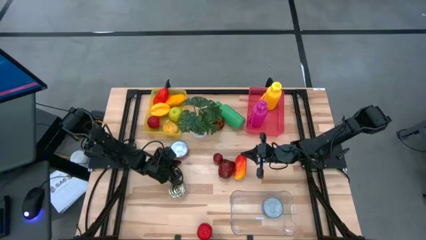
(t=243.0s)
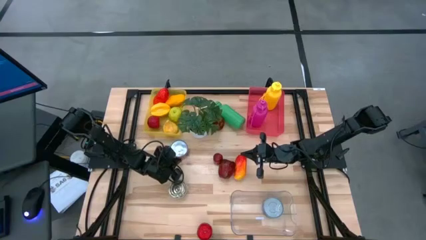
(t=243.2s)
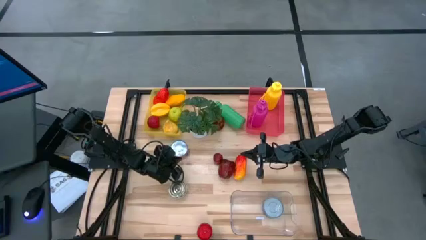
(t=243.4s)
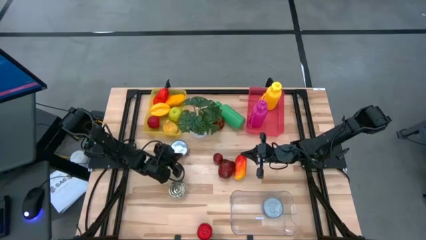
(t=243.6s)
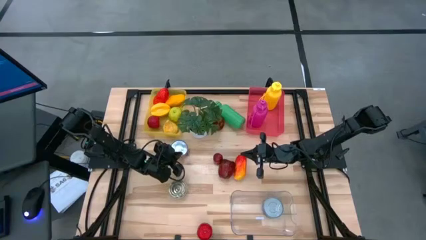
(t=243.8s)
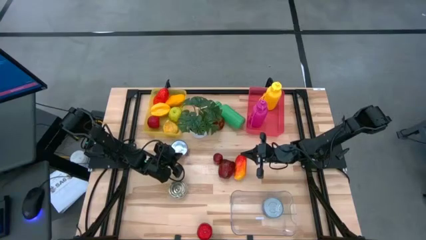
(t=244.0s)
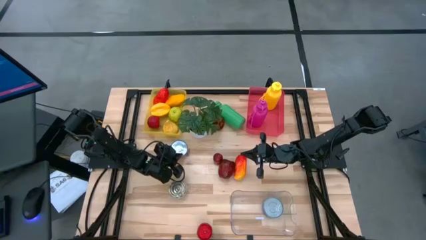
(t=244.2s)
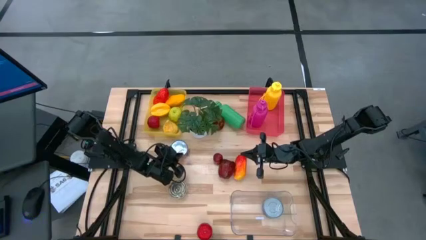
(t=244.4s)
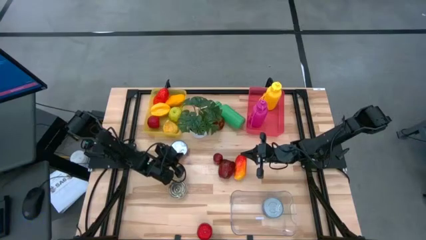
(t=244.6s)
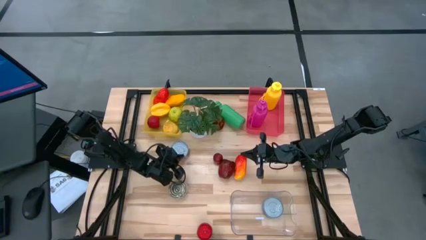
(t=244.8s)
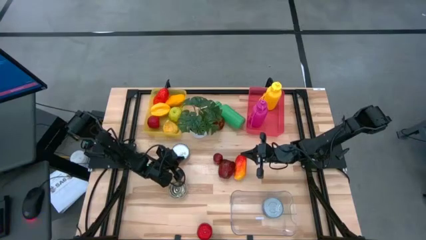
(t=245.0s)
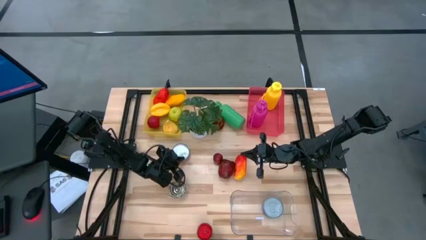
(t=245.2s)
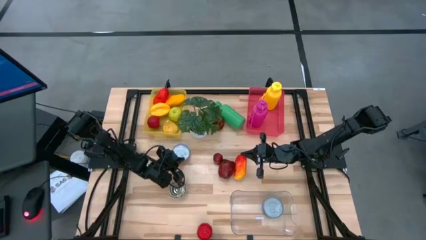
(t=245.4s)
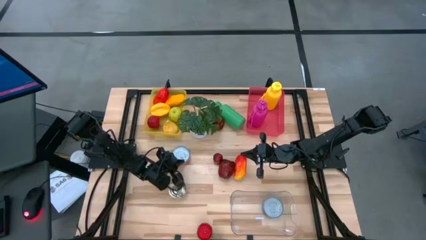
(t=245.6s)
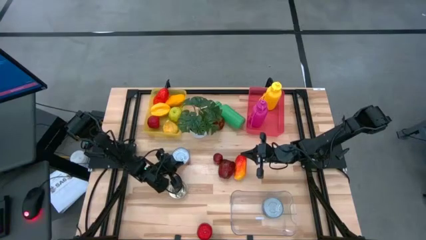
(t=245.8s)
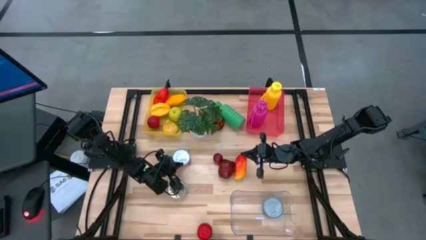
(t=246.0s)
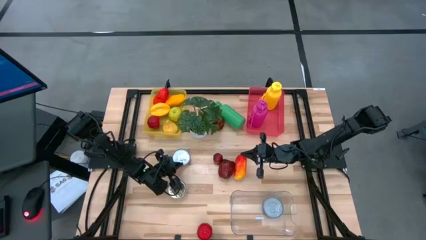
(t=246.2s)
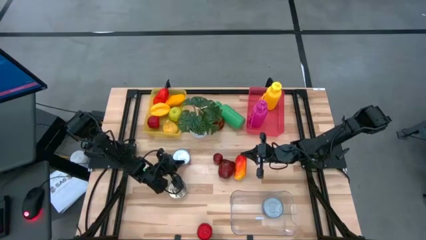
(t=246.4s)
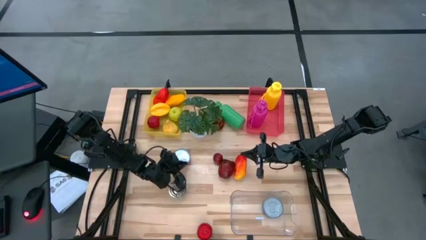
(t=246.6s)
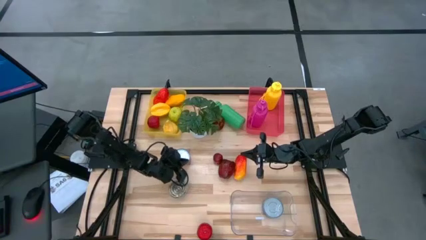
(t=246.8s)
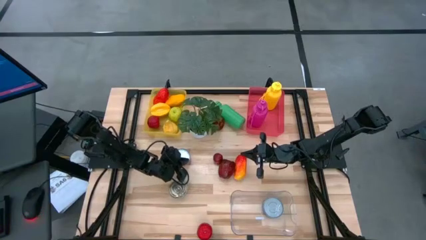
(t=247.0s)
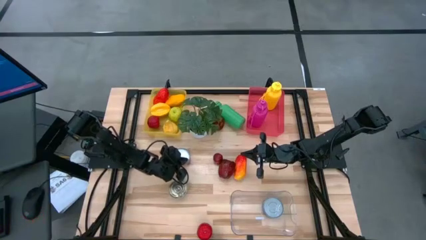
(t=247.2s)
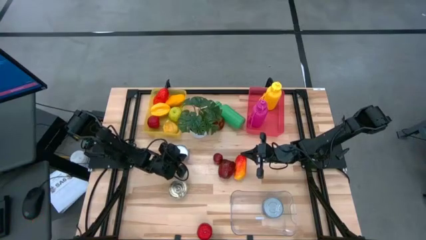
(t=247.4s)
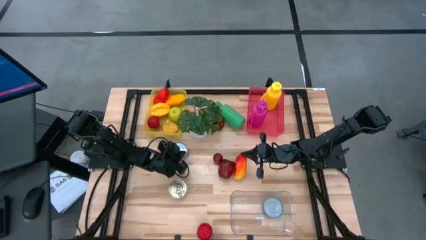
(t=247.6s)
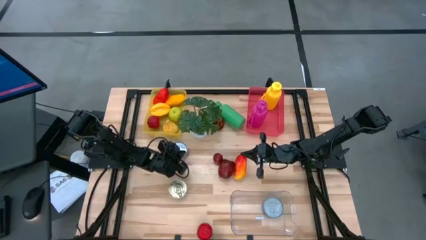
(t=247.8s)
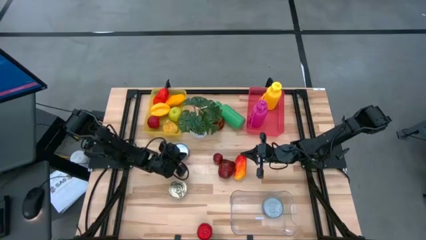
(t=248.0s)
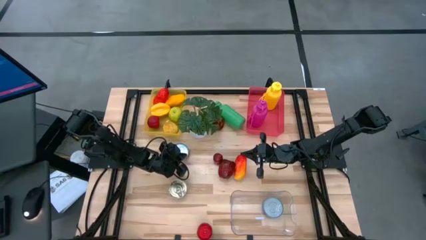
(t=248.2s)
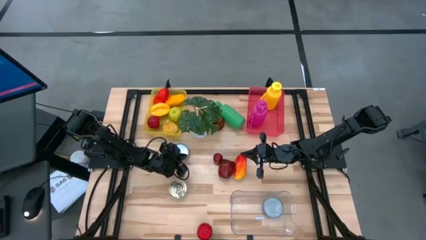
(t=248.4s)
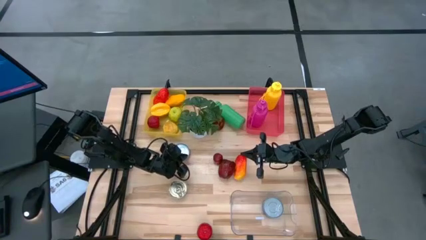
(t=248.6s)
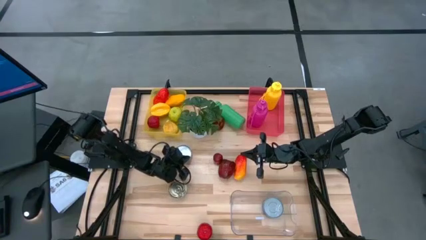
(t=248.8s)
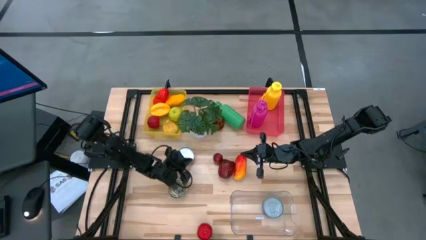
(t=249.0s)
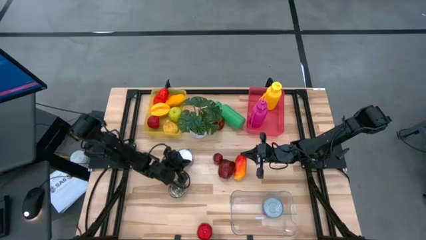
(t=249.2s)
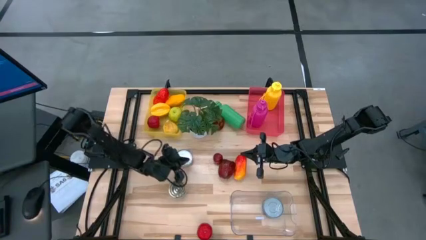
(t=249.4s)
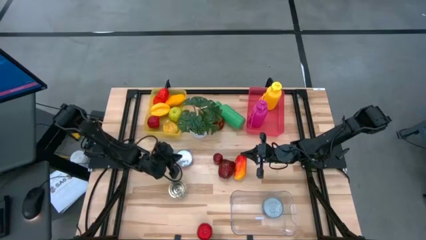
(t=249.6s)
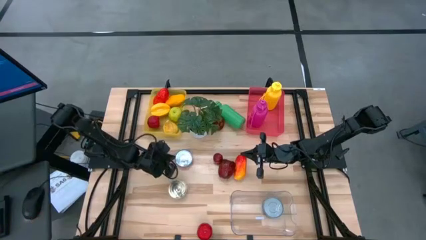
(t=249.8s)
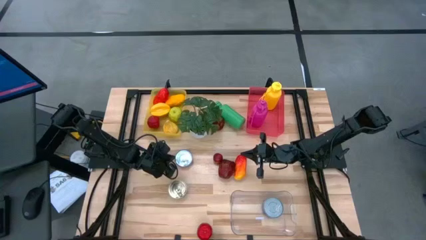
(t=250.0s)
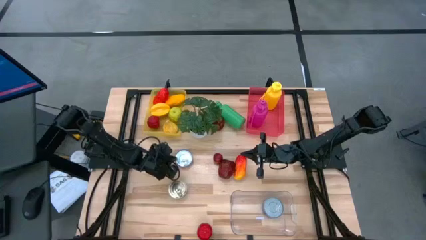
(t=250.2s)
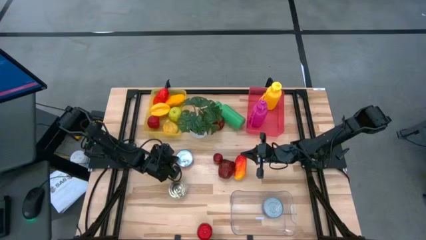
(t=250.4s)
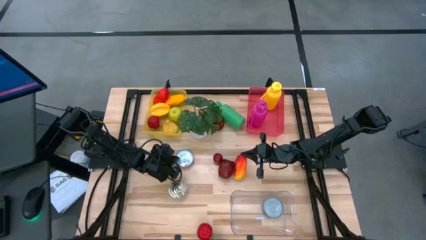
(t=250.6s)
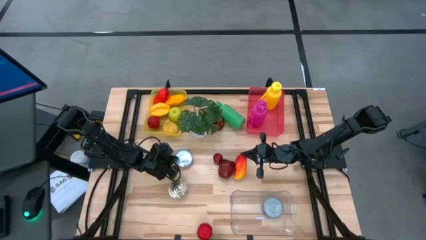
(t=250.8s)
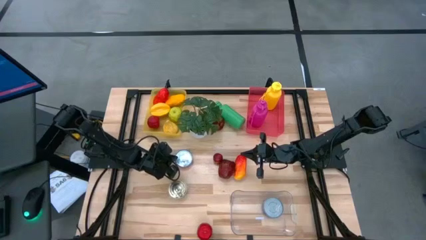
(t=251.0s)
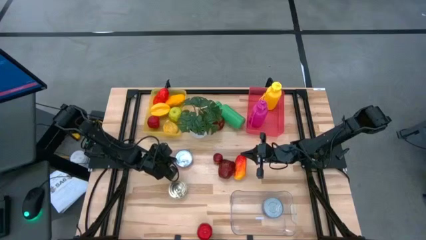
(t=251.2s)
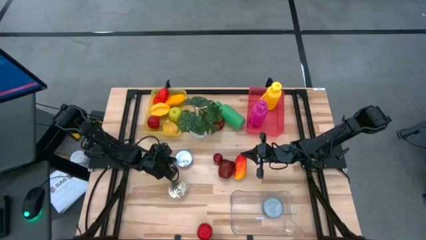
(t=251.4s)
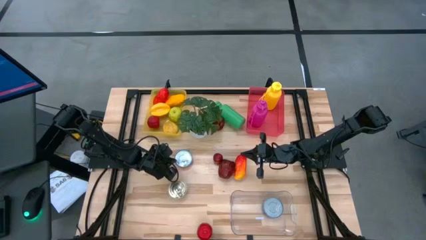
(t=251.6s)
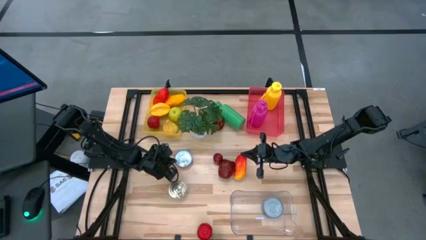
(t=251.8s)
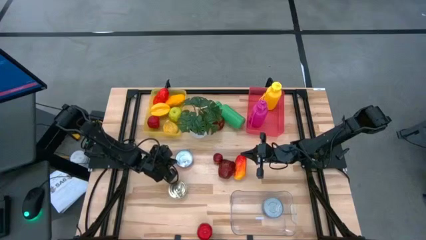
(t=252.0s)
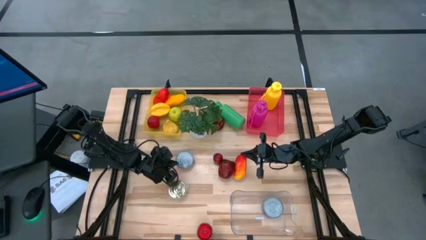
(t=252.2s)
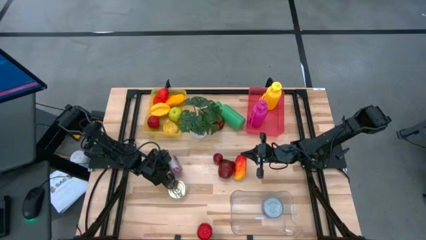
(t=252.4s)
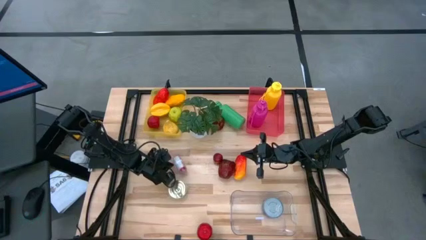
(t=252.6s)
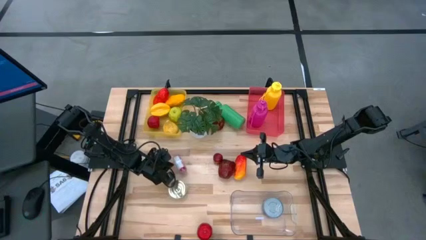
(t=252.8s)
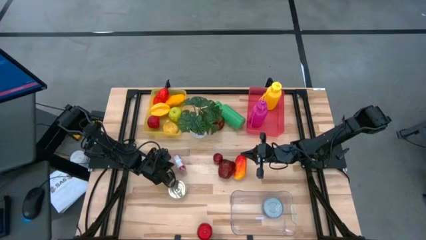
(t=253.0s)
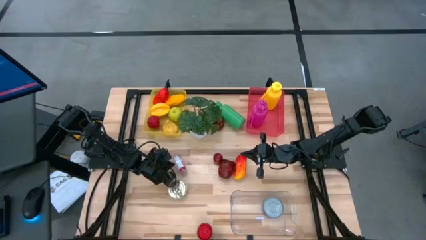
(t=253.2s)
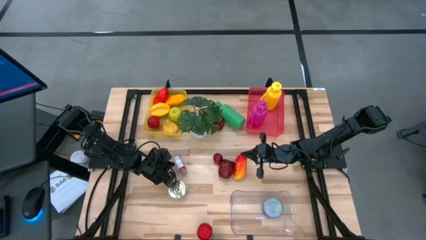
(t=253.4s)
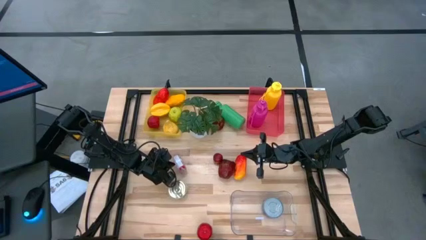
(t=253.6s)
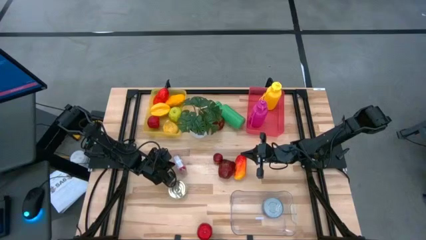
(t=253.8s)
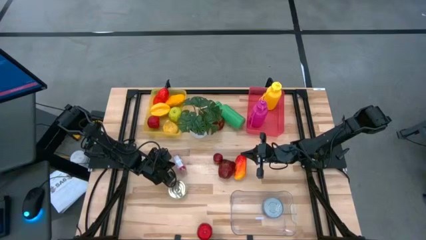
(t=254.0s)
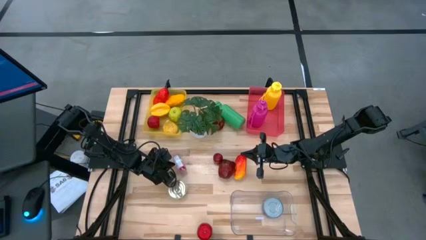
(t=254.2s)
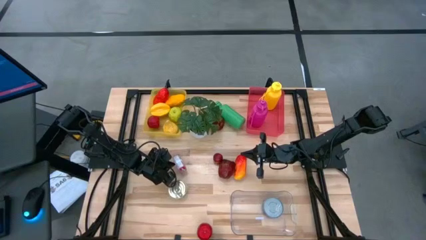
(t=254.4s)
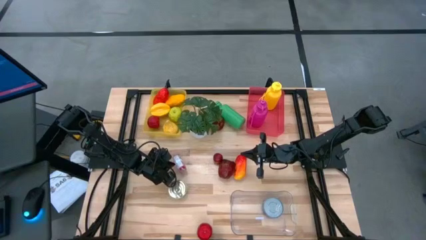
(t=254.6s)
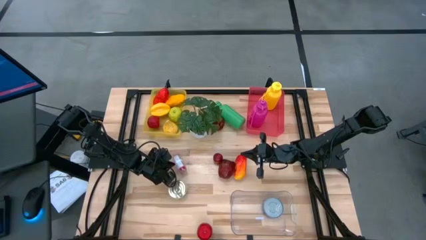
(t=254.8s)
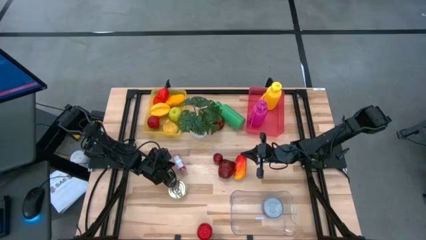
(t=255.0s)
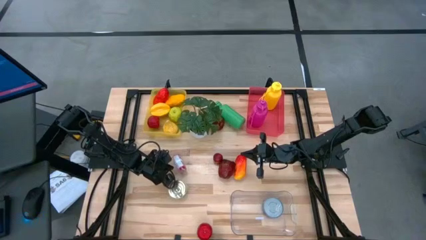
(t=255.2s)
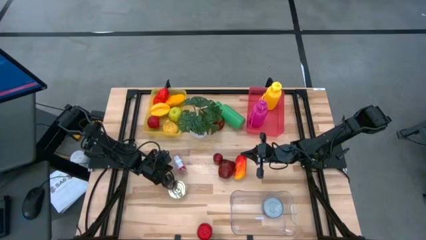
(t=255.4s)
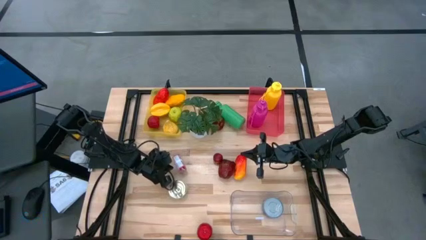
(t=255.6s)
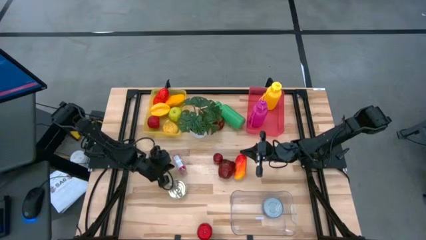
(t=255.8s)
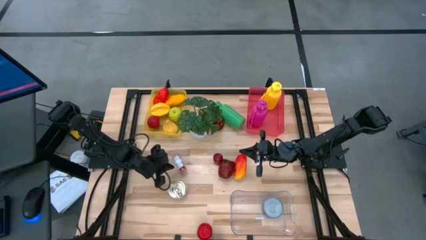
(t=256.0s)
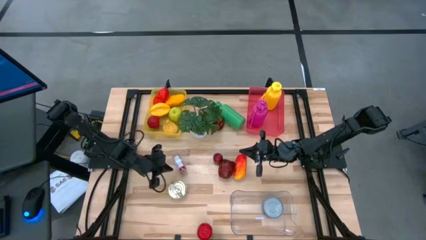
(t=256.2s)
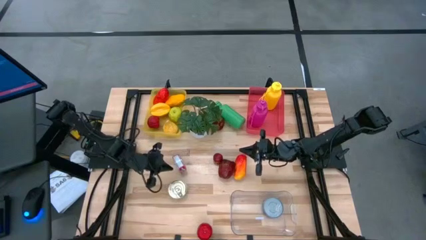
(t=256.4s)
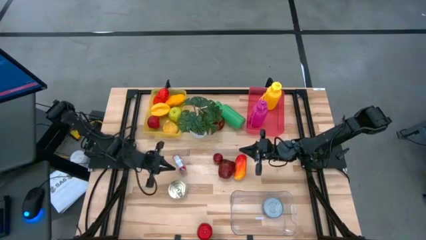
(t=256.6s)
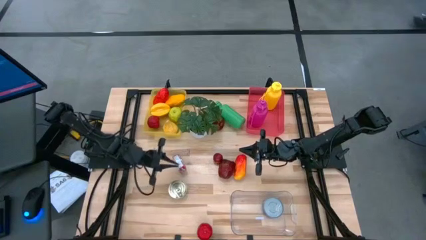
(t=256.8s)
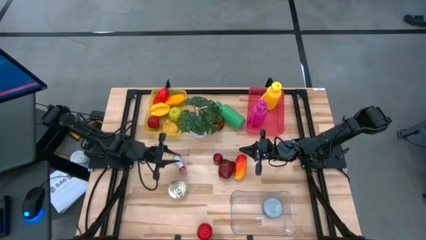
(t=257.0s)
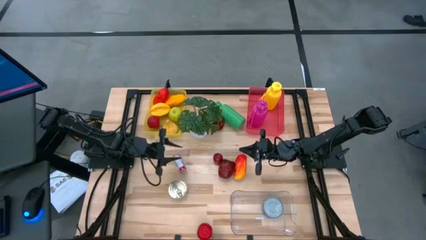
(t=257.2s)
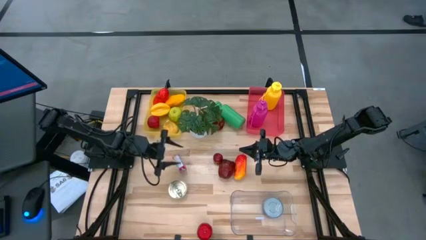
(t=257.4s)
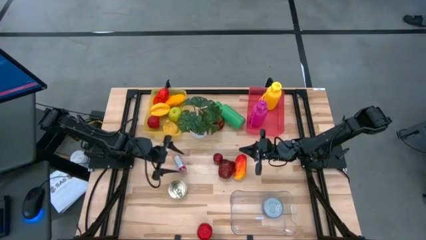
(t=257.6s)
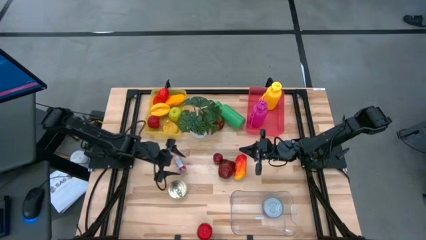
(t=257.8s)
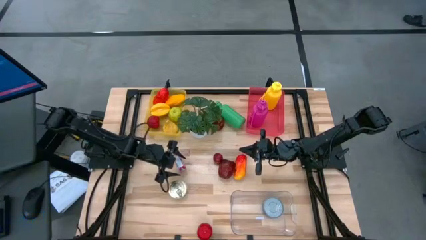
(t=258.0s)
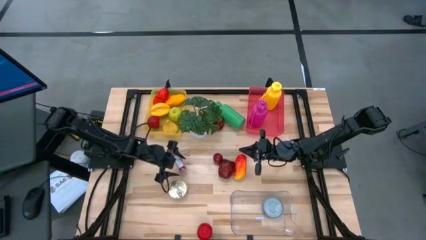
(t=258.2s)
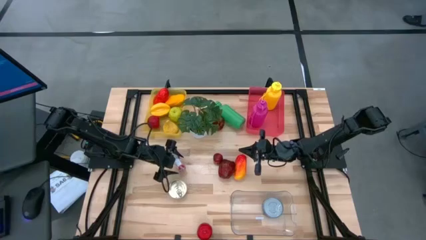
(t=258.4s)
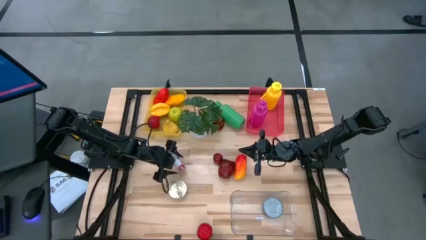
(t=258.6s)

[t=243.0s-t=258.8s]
Task: Pick & Place Food Item
Put the red tuna can into the transparent bin
